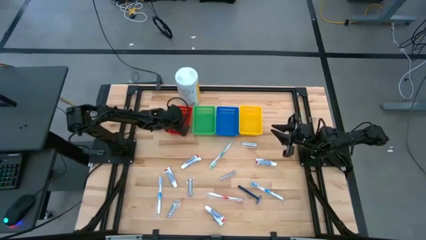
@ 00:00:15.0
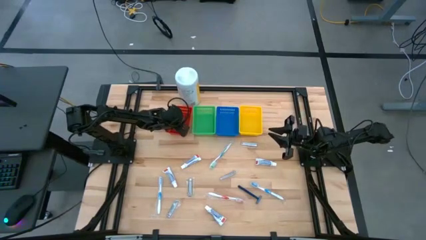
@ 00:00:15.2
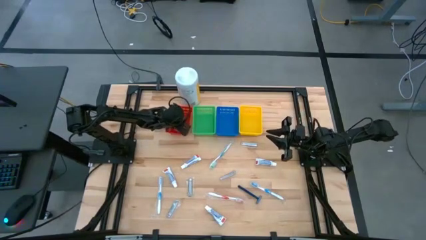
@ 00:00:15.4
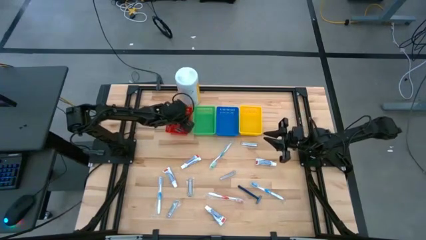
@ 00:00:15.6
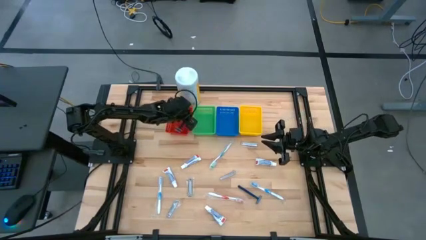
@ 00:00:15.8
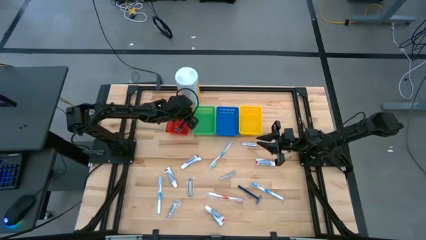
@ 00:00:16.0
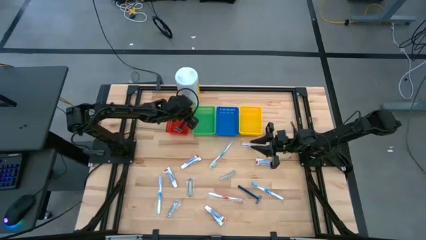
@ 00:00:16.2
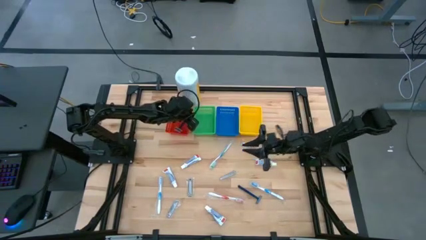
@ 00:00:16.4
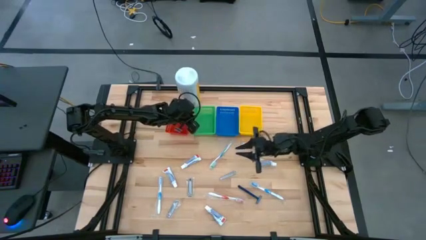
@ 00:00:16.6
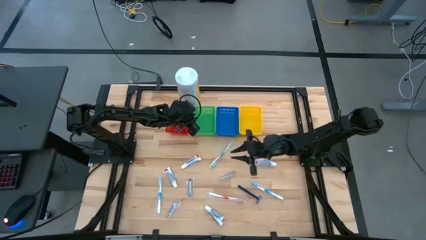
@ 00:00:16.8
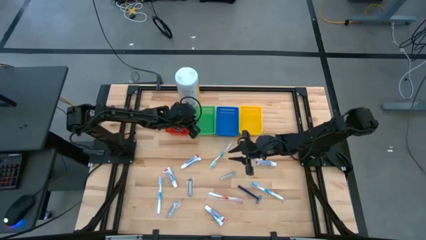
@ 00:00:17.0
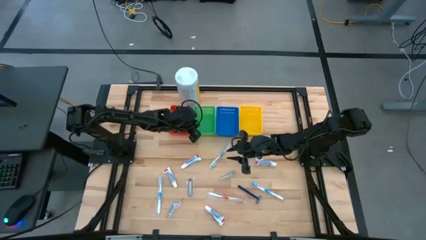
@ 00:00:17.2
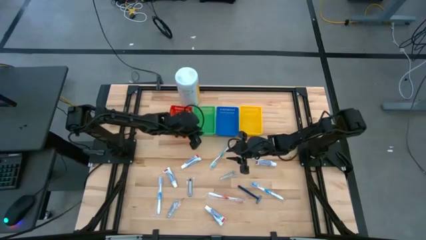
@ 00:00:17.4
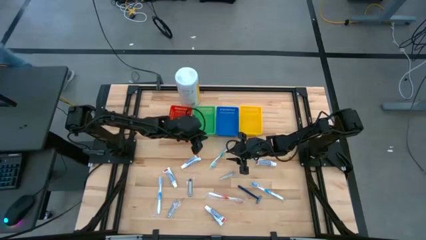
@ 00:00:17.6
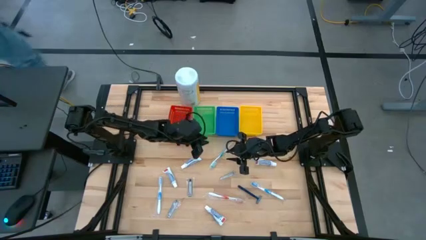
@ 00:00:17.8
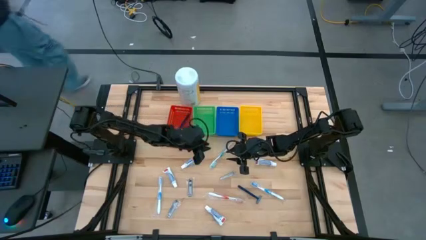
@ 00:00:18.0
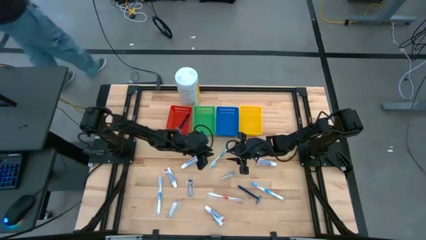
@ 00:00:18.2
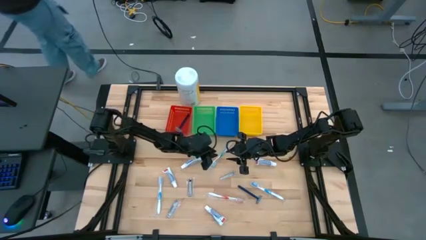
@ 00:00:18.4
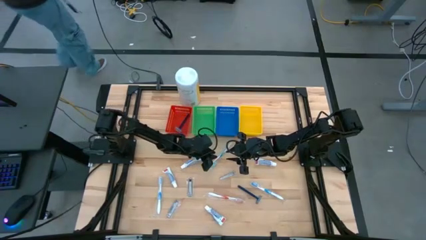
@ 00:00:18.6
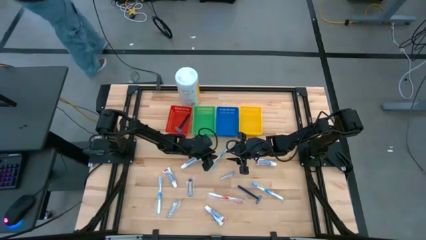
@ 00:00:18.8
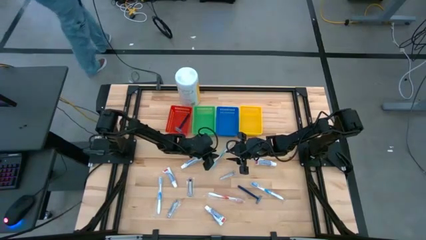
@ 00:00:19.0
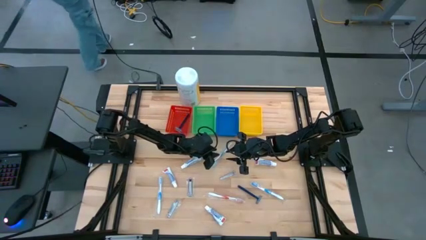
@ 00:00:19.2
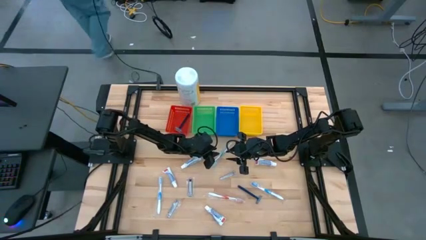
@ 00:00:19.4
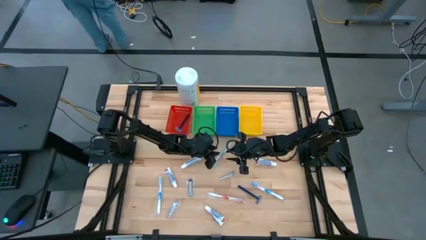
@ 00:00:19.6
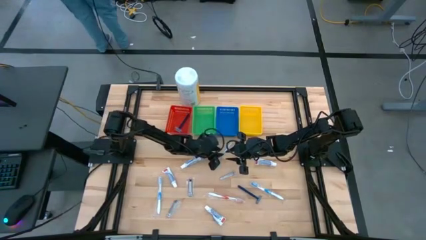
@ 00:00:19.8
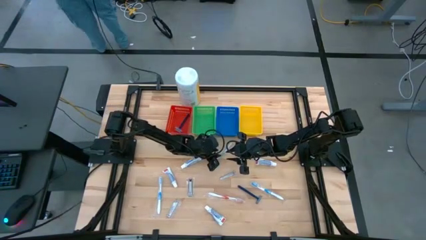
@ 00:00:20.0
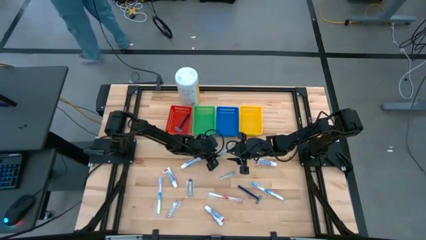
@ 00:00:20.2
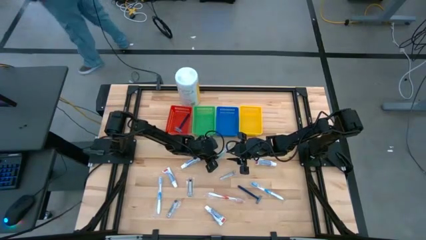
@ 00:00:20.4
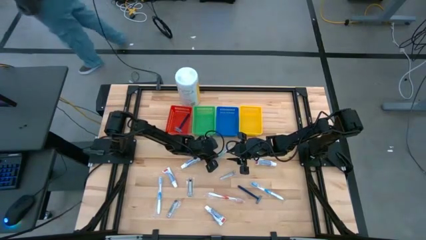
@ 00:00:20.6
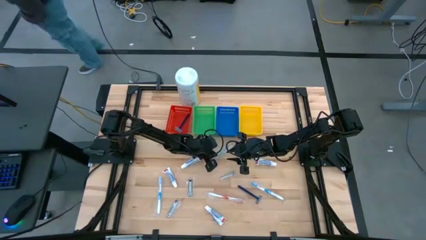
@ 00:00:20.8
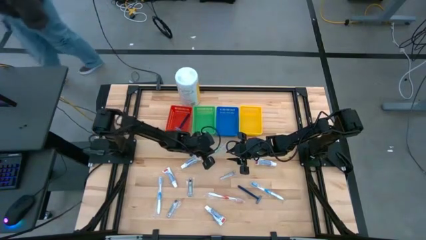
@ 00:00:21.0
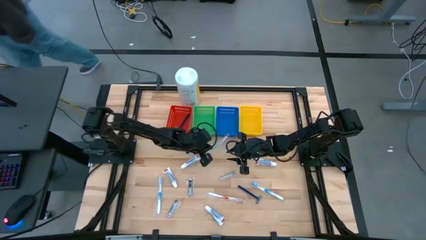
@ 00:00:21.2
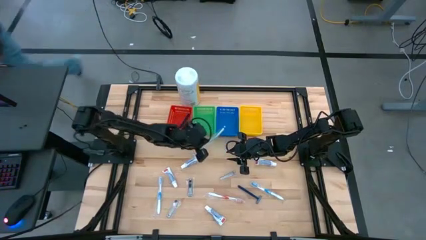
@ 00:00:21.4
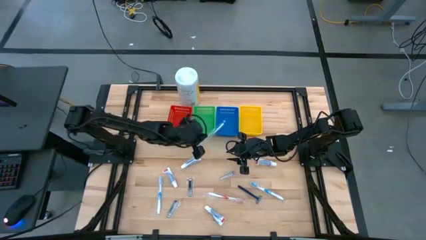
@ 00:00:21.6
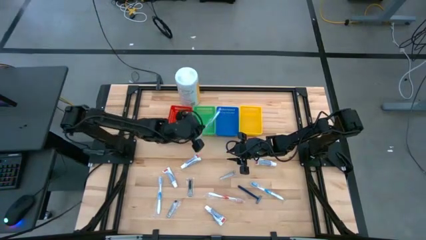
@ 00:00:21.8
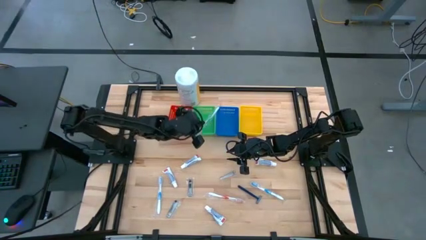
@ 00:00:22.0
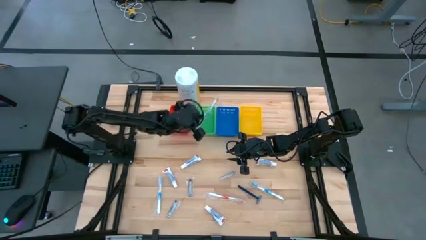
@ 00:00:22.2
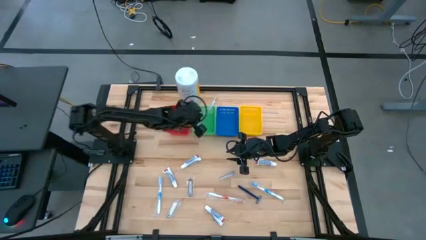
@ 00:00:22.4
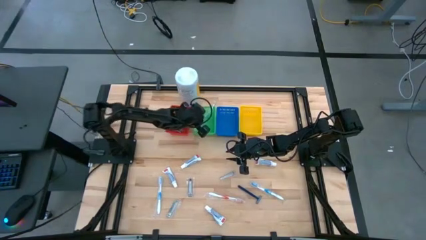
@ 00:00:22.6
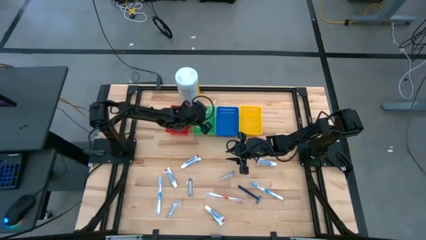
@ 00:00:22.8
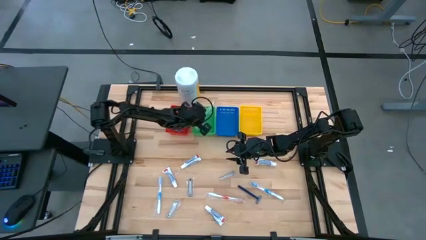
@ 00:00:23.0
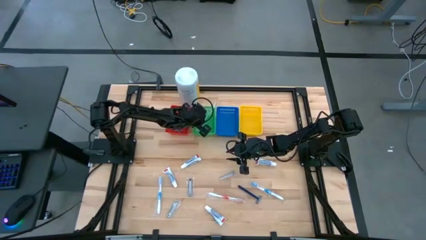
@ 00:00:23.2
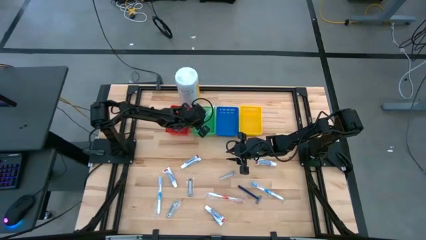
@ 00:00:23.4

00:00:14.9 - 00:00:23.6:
Task: Pick & Place Travel size toiletries
Put the blue toothbrush into the green bin

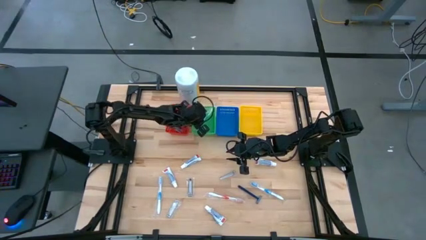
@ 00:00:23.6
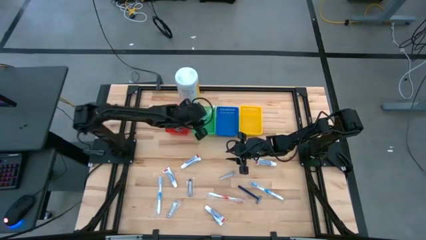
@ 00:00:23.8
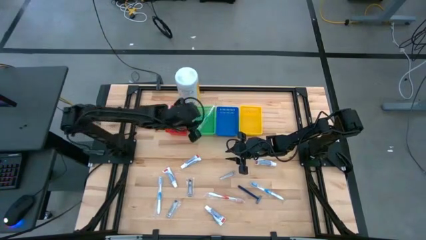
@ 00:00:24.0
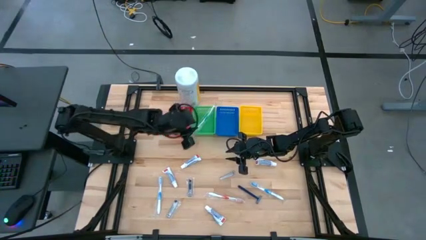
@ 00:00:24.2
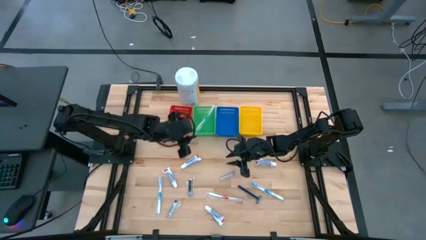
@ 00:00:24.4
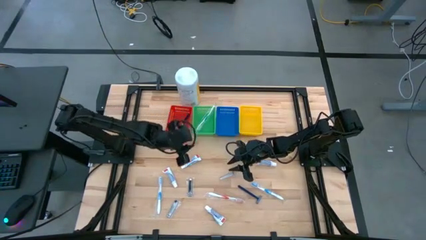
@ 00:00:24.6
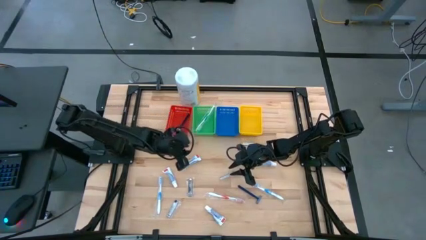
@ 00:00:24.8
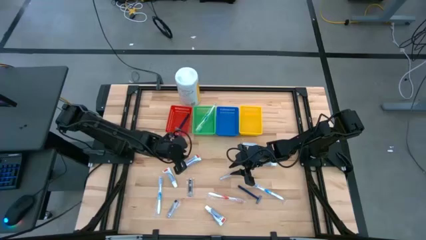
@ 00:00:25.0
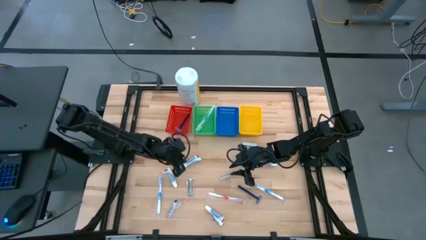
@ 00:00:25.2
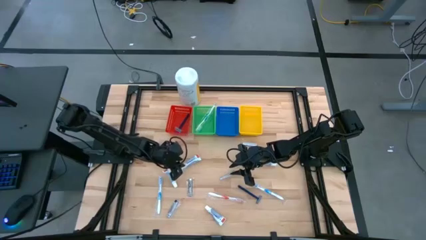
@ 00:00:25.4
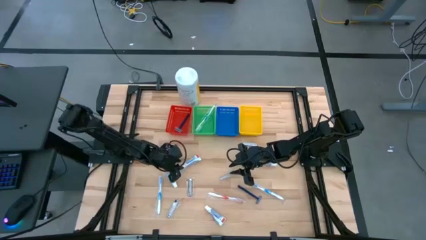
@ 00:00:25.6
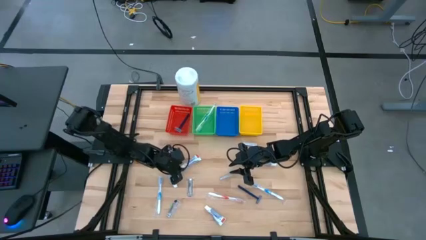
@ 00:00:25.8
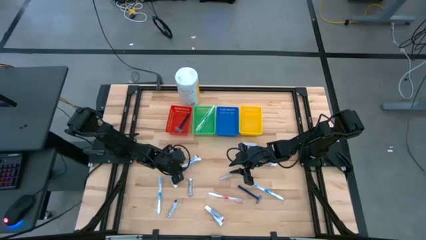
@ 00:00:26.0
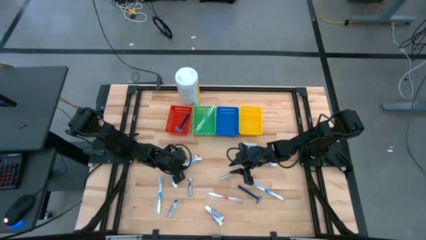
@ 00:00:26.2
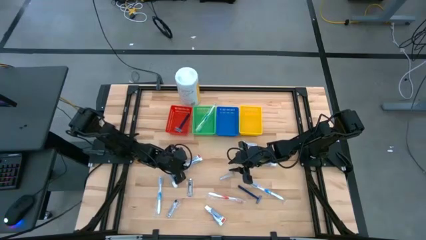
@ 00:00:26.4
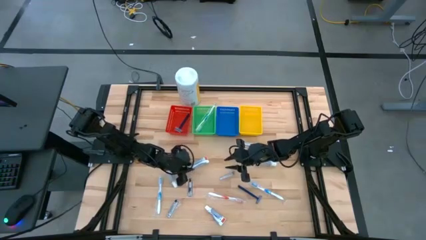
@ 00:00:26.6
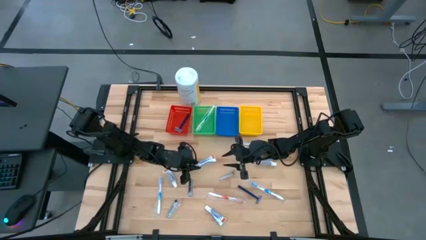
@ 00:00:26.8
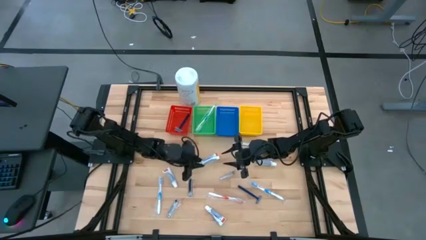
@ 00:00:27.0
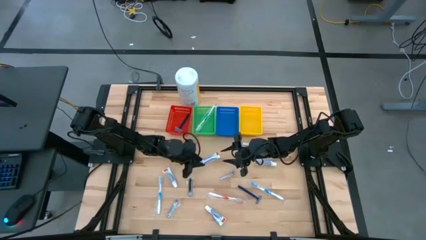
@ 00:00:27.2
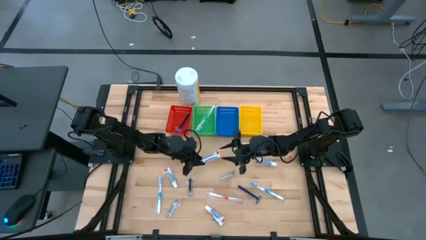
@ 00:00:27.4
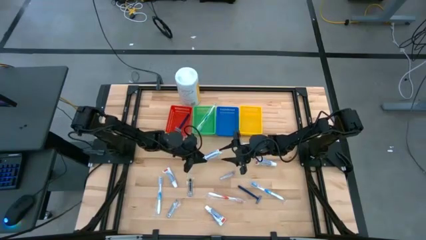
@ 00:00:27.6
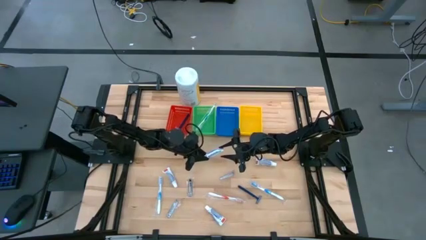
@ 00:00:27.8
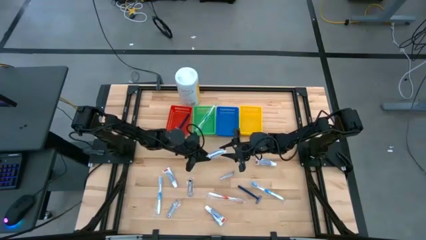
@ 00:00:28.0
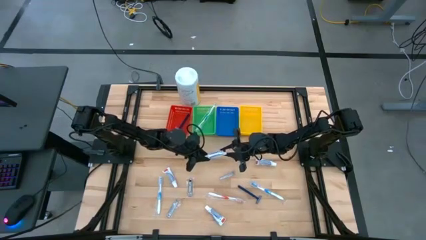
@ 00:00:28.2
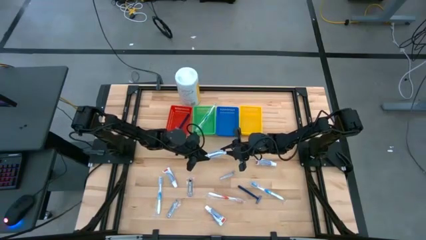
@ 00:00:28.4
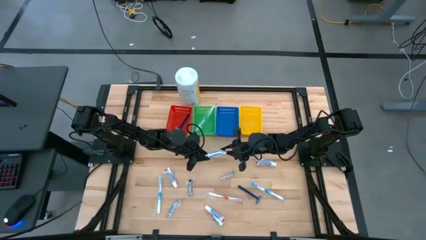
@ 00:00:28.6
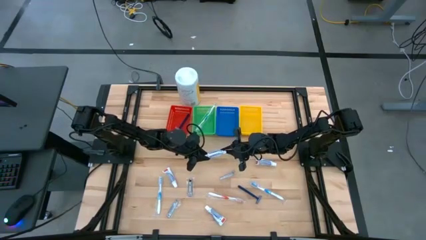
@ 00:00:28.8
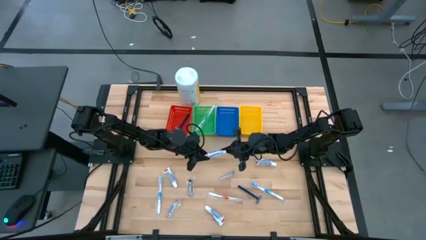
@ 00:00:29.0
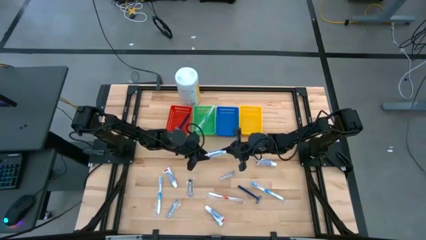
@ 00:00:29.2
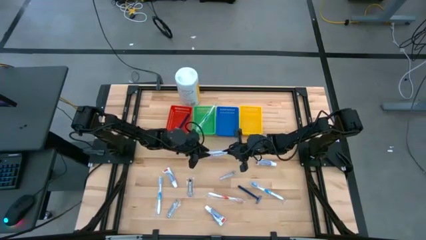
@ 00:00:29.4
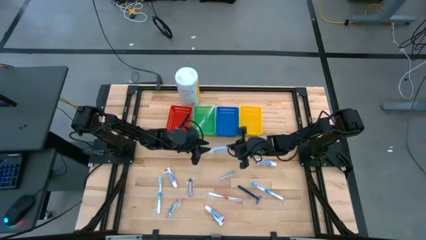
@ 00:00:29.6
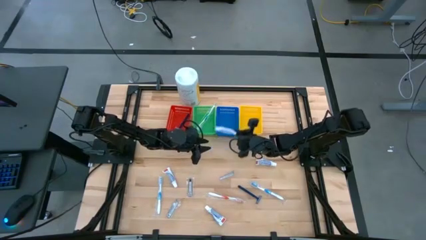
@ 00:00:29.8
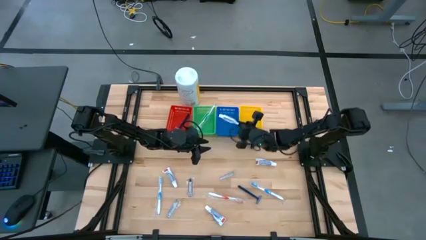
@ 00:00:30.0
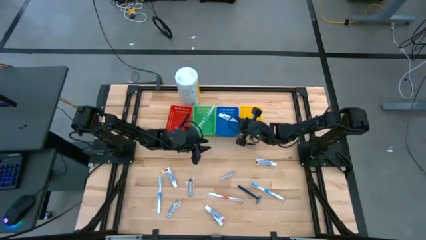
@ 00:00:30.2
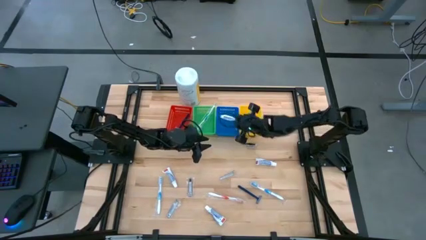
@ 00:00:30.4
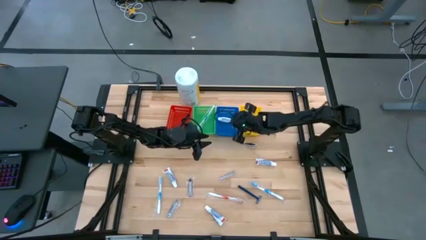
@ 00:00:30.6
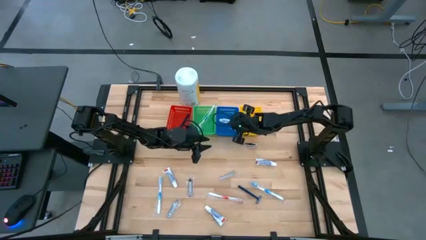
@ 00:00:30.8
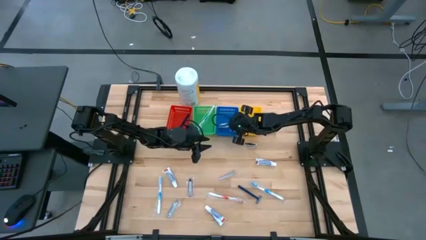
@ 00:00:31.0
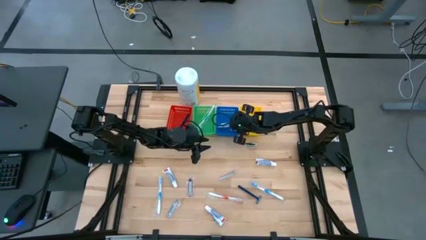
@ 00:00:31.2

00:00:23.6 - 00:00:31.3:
Put the white toothpaste into the blue bin

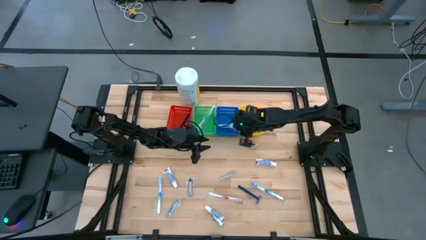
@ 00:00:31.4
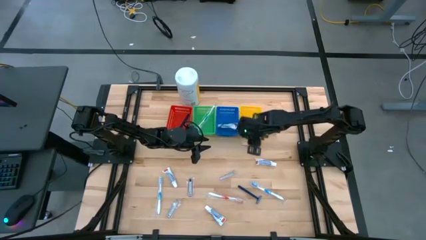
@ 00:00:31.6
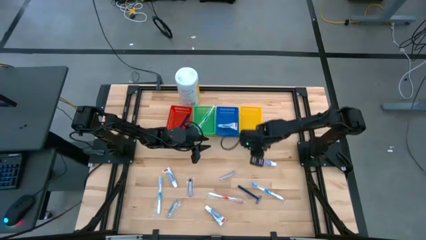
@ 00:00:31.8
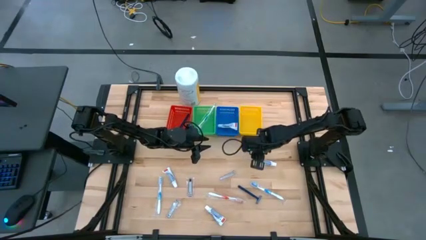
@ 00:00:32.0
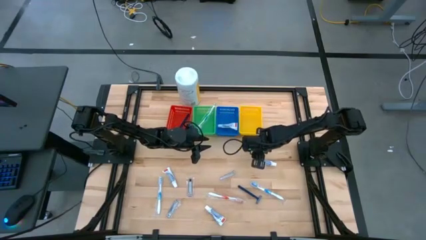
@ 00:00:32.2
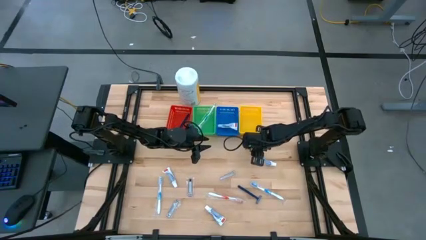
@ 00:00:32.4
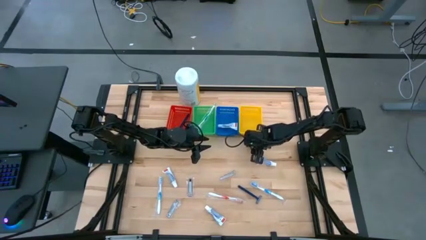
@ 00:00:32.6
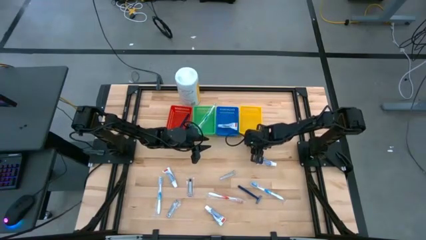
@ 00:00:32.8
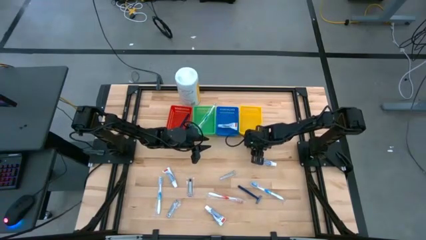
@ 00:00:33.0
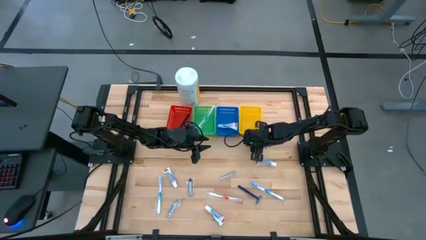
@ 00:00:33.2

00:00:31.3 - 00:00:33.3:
Put the silver nail cutter into the yellow bin
